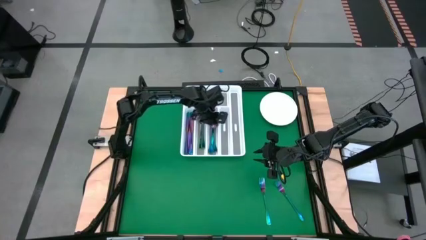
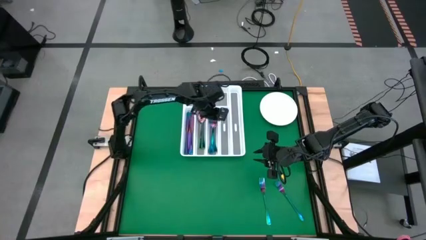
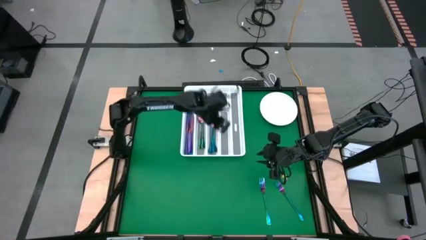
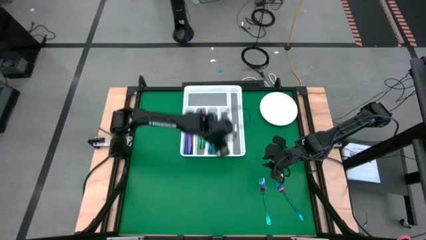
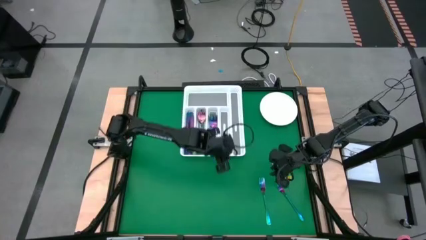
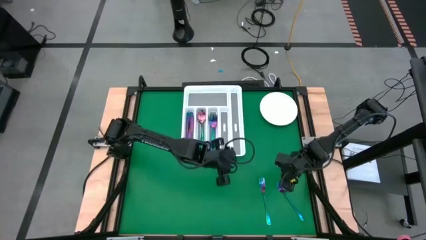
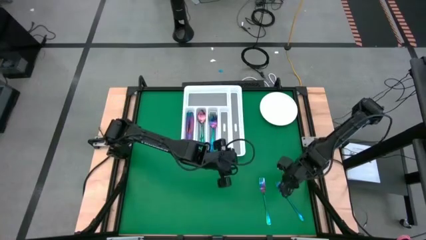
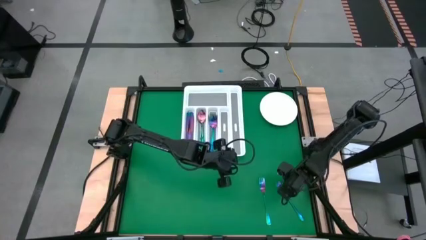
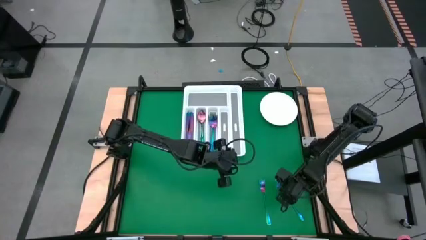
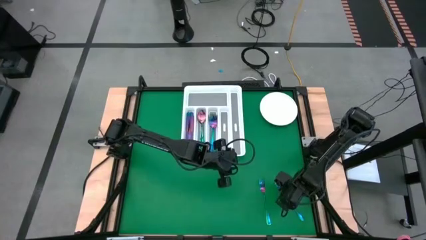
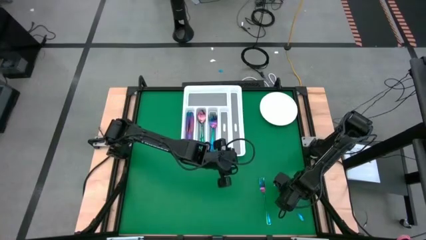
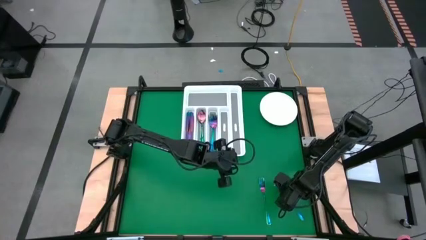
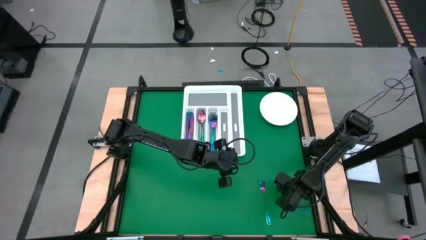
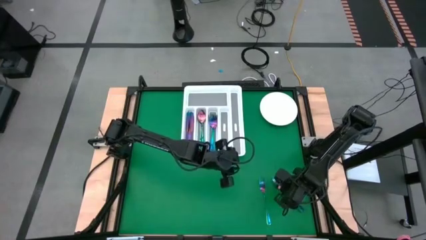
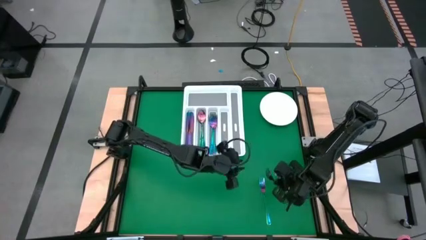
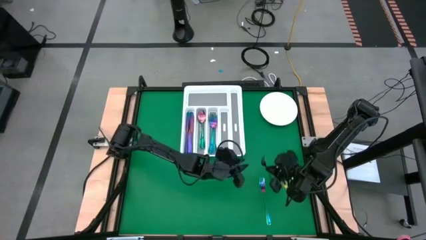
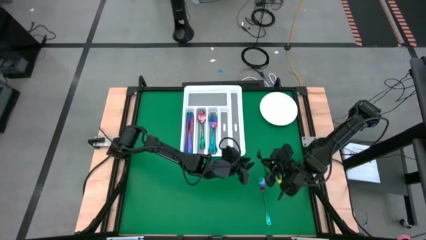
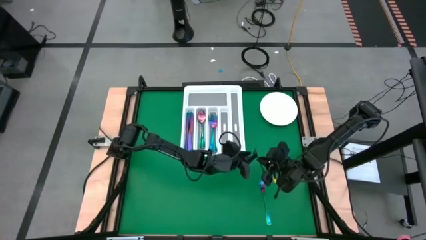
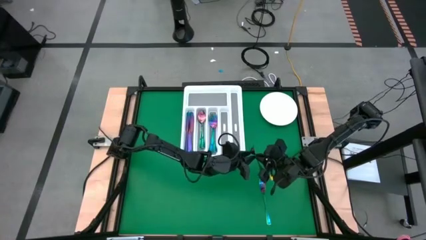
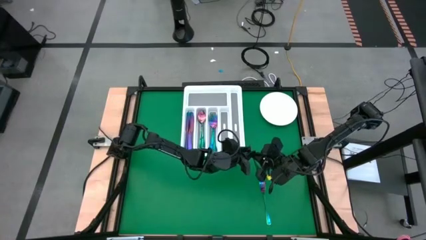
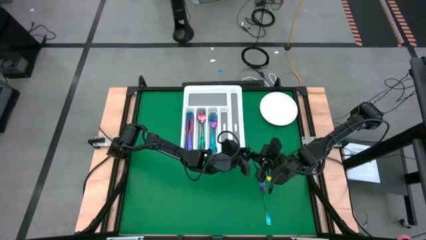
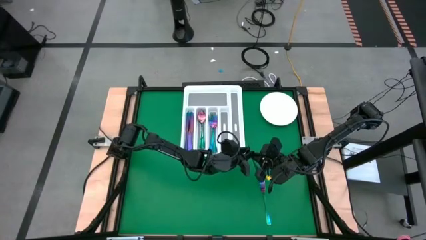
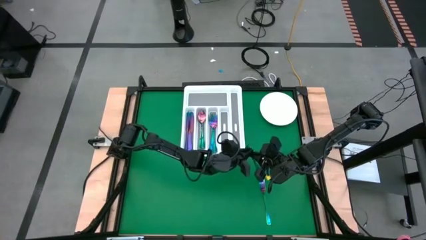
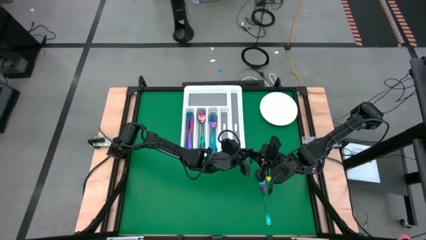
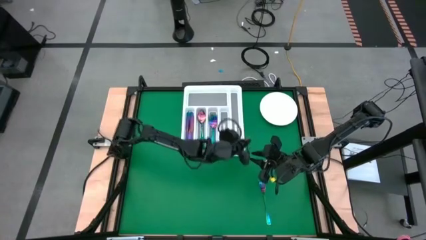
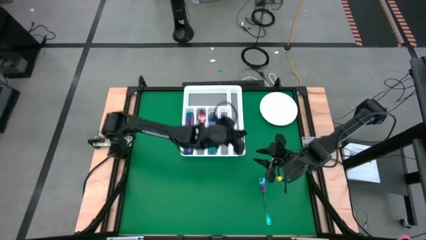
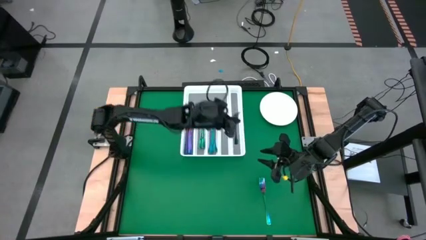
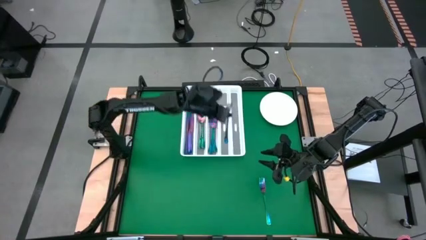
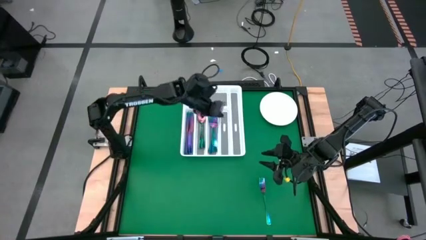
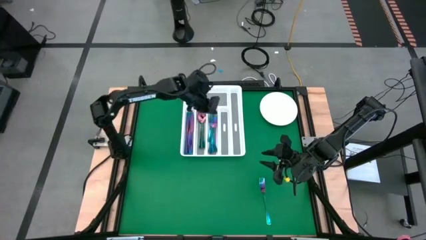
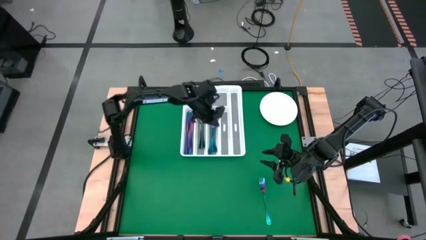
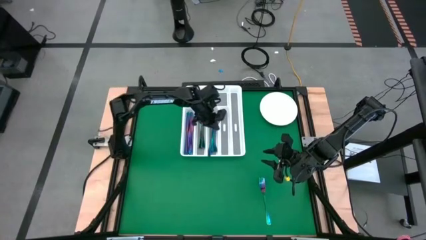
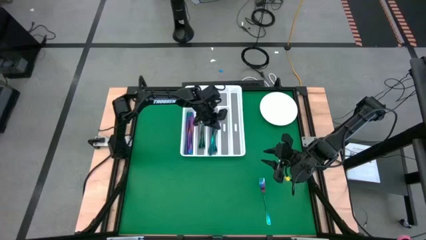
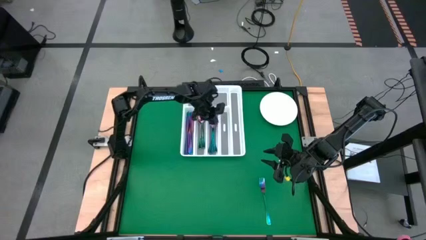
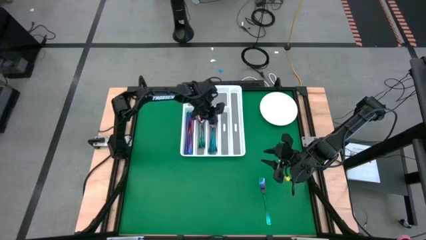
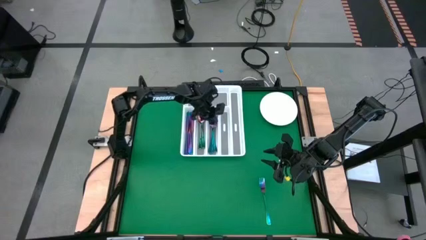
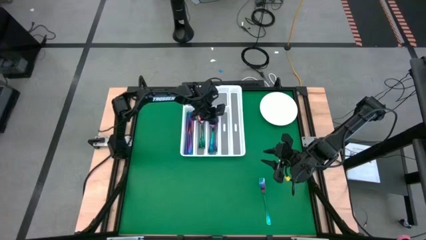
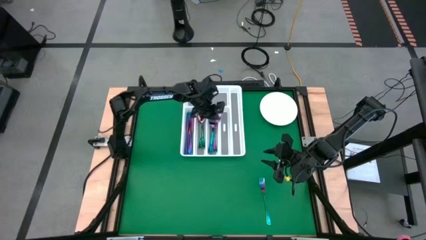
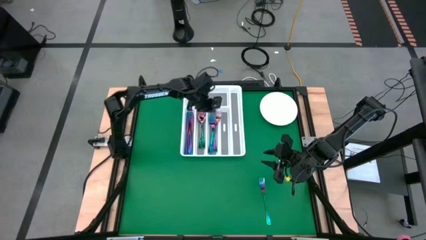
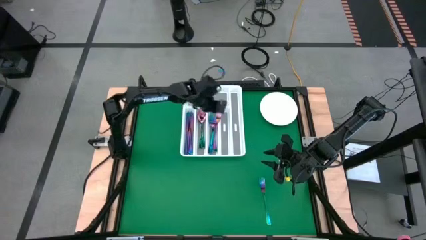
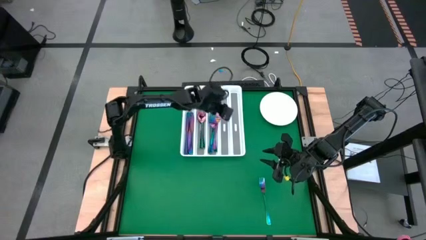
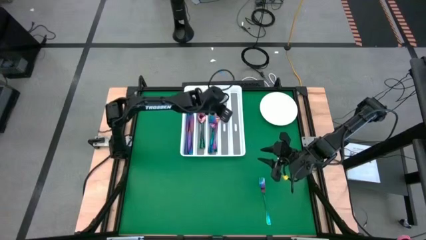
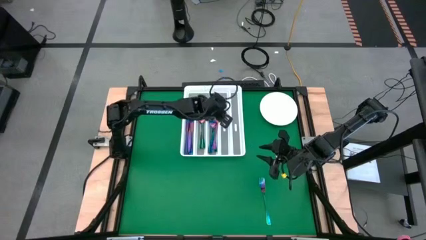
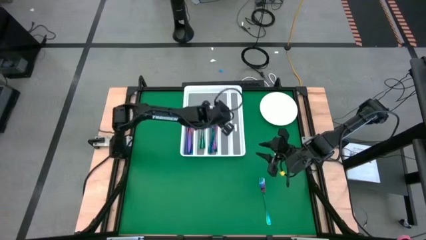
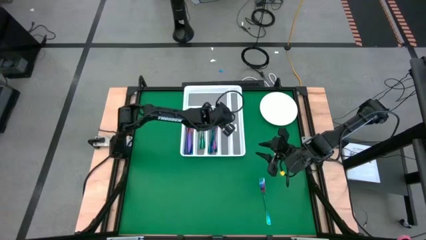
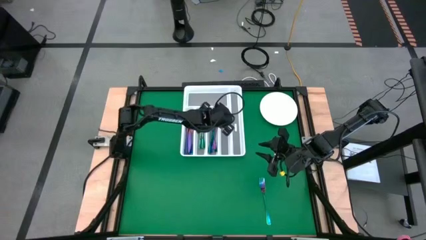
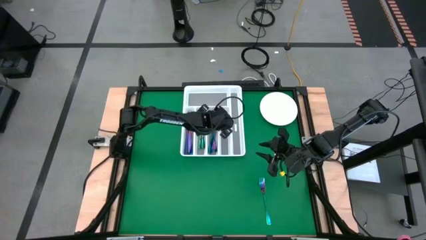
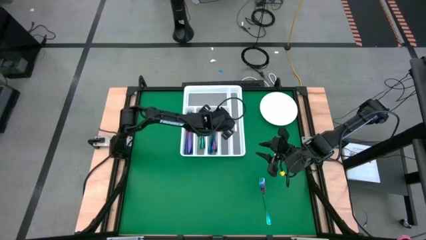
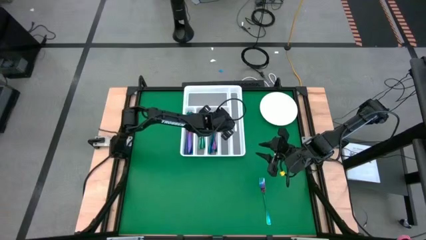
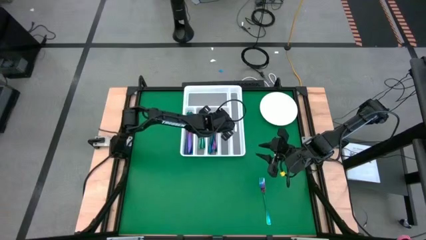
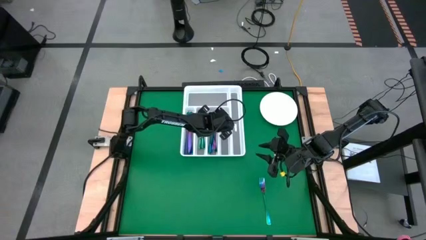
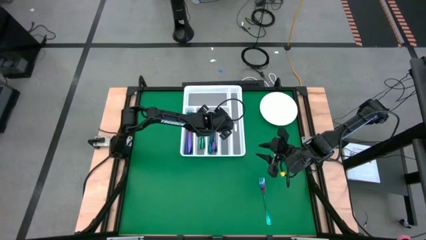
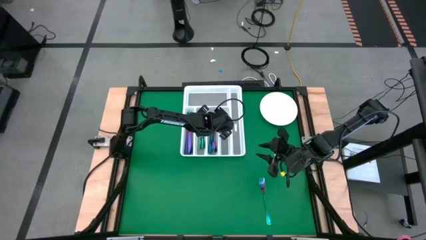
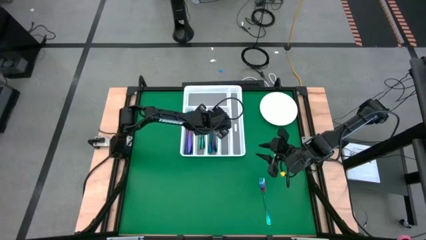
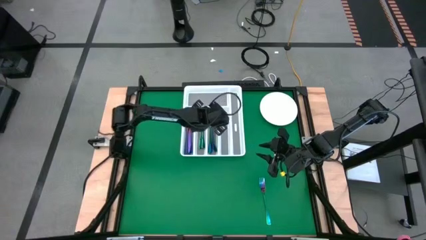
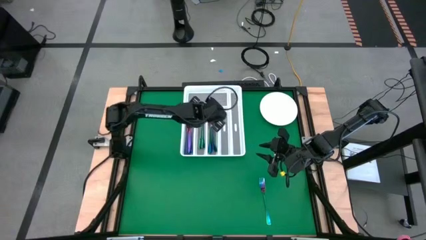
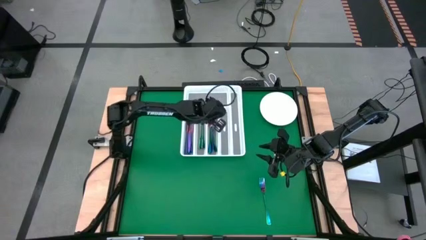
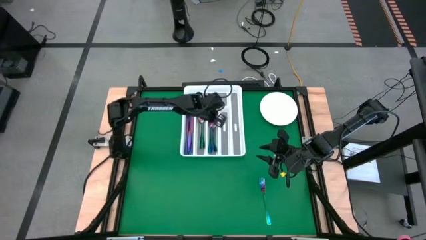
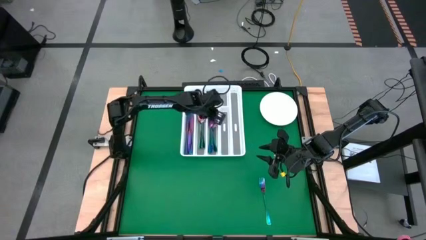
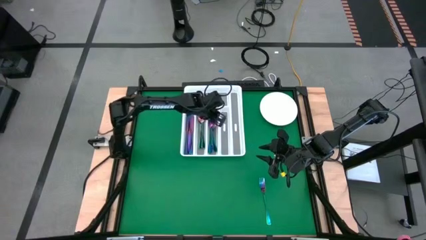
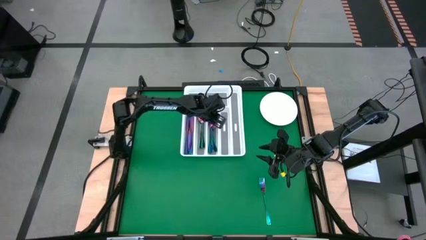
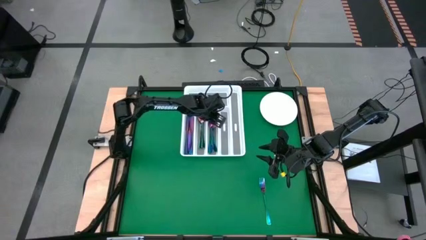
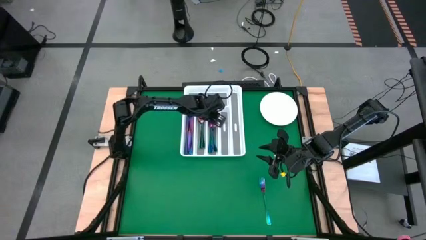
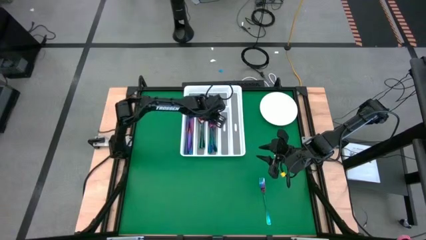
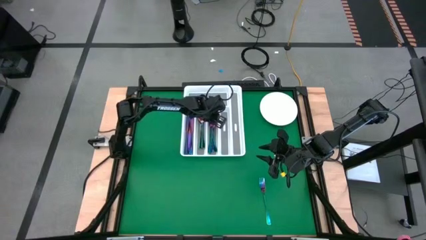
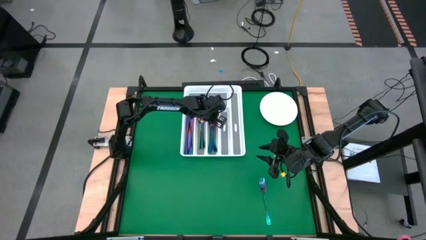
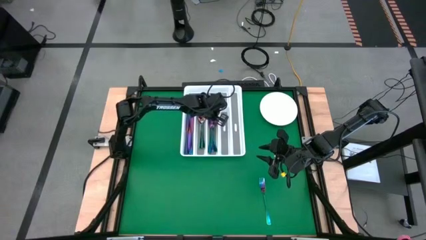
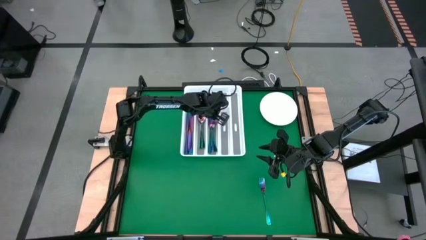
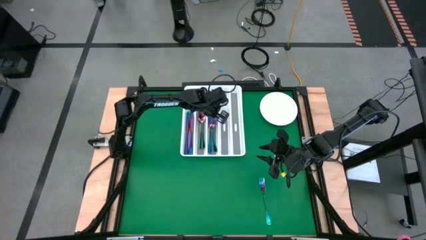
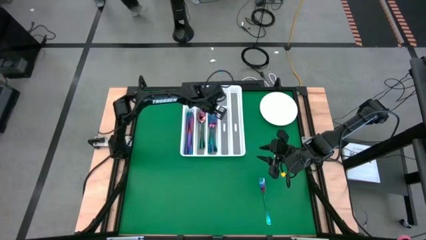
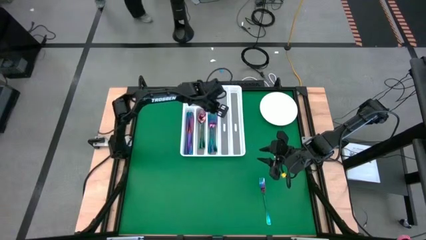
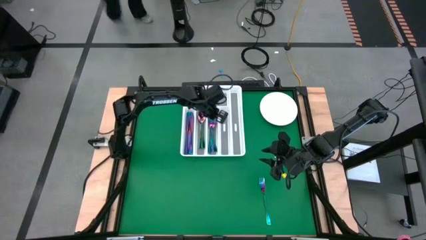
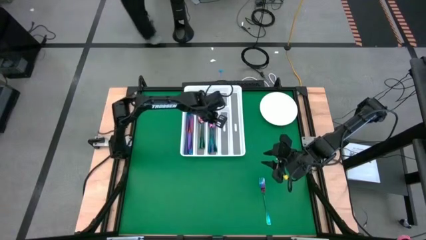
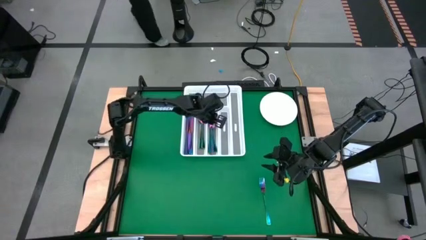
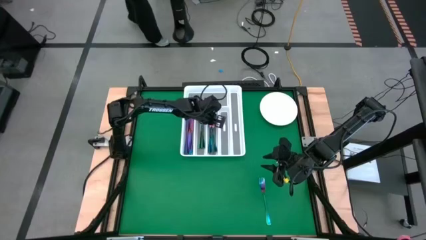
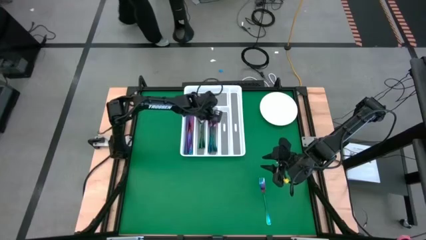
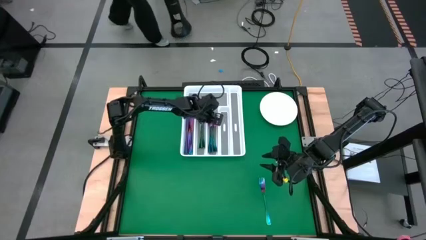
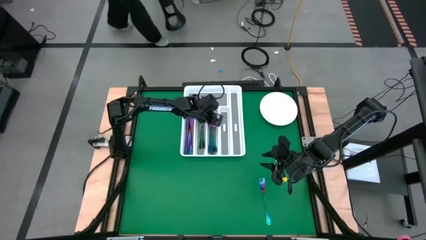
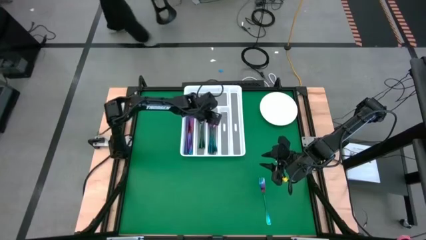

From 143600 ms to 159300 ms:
Task: Sort silverware
Put the blue fork into the silverware tray
